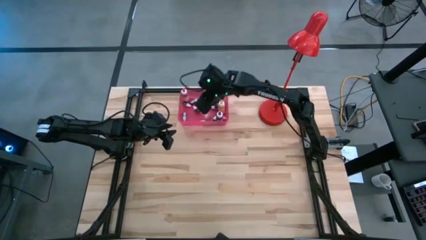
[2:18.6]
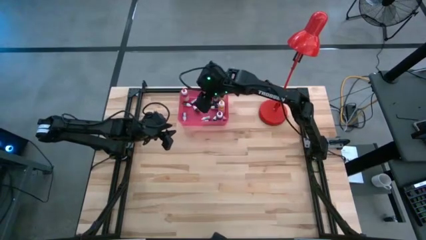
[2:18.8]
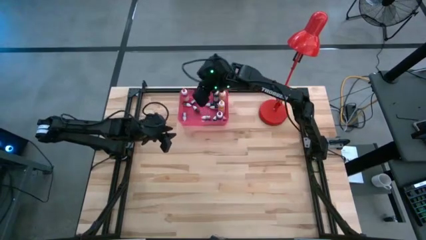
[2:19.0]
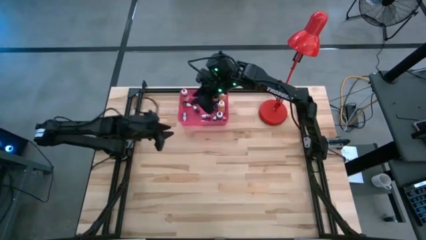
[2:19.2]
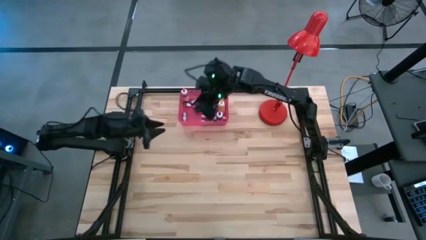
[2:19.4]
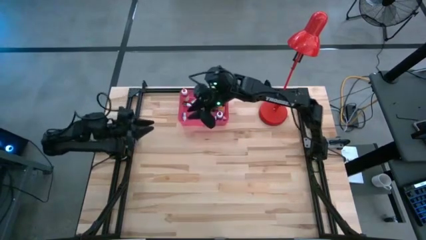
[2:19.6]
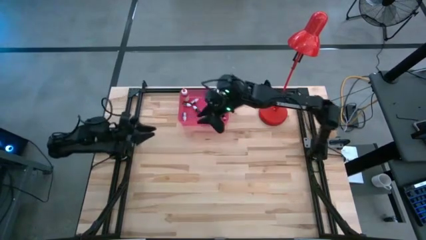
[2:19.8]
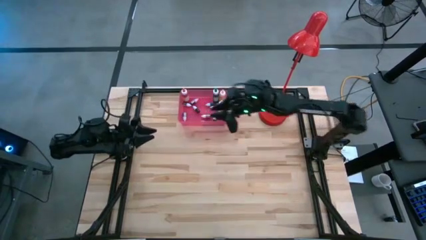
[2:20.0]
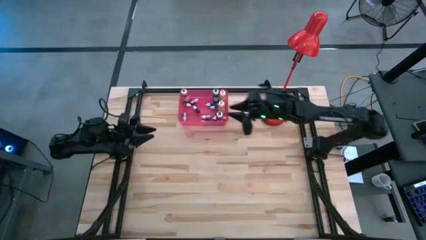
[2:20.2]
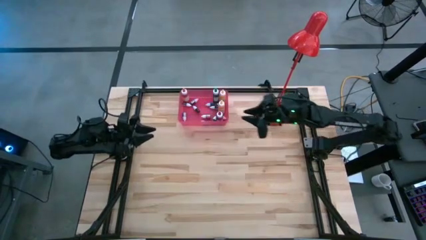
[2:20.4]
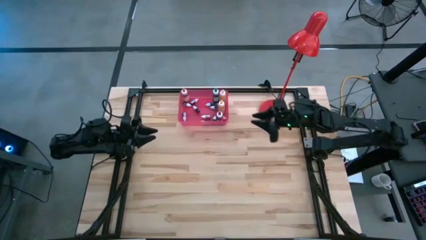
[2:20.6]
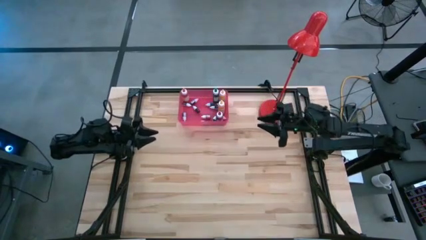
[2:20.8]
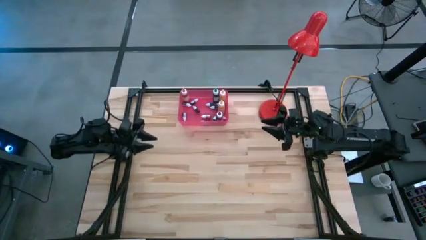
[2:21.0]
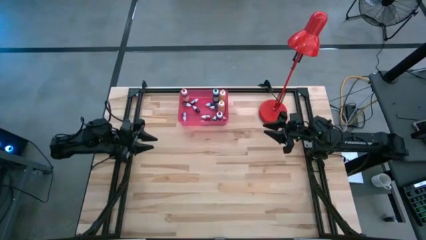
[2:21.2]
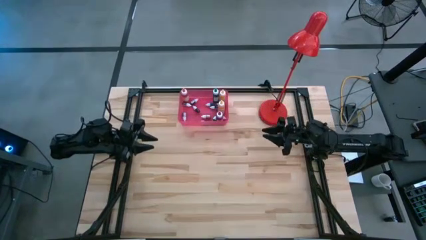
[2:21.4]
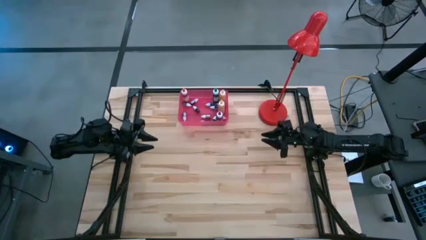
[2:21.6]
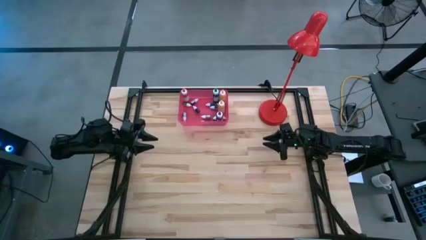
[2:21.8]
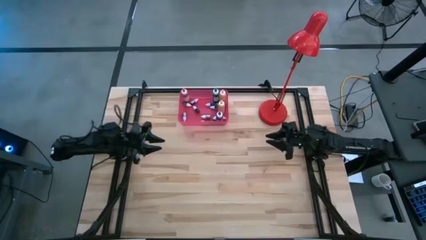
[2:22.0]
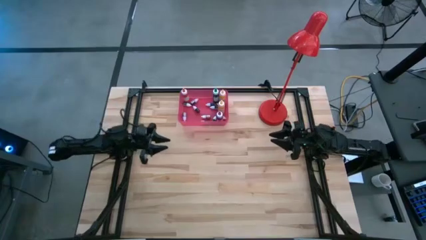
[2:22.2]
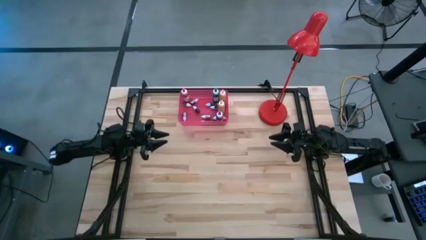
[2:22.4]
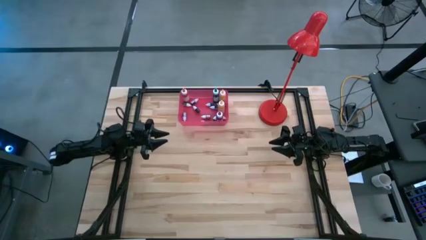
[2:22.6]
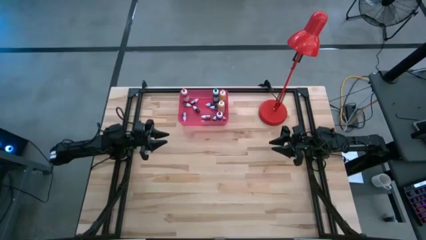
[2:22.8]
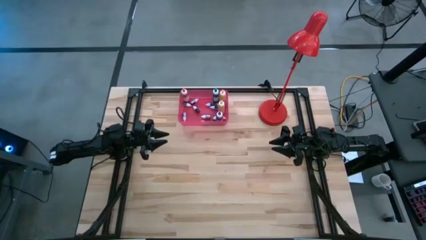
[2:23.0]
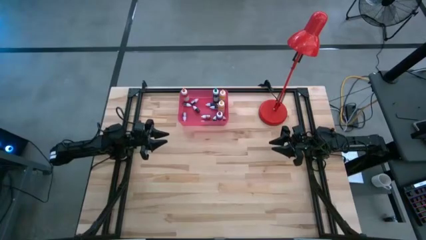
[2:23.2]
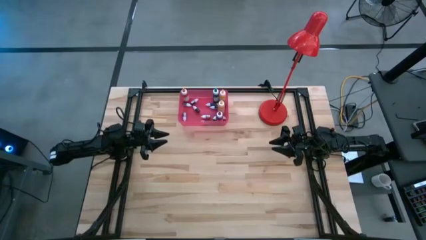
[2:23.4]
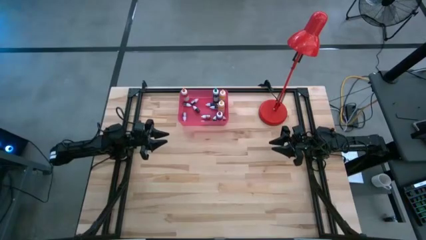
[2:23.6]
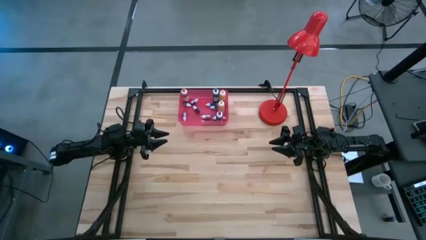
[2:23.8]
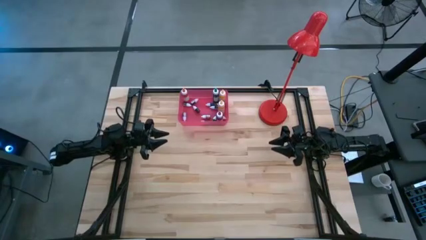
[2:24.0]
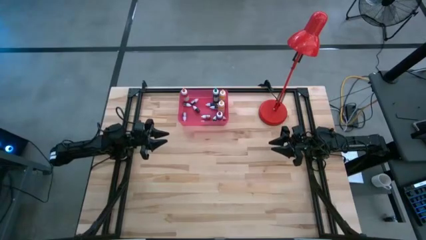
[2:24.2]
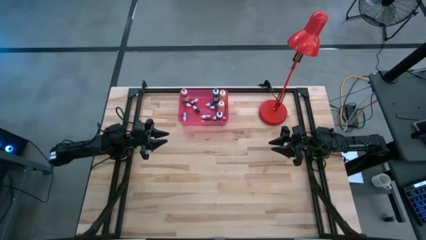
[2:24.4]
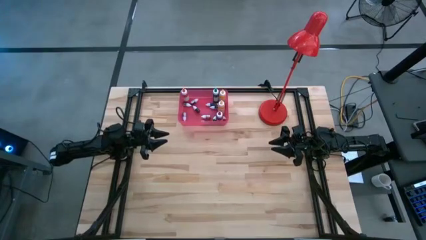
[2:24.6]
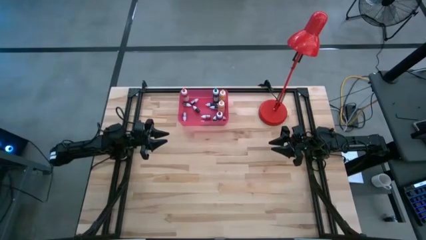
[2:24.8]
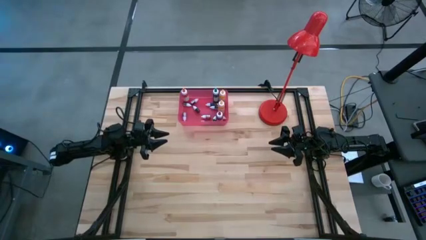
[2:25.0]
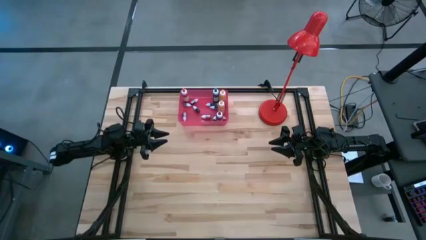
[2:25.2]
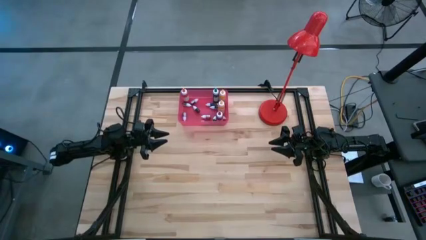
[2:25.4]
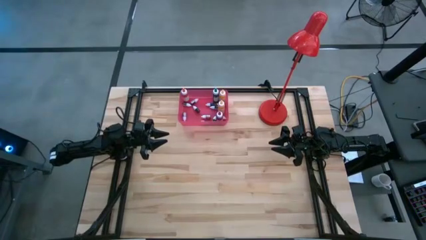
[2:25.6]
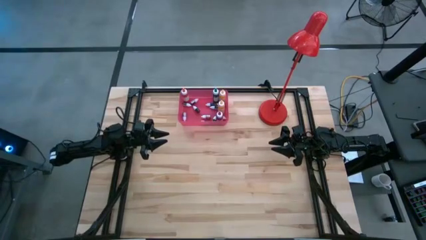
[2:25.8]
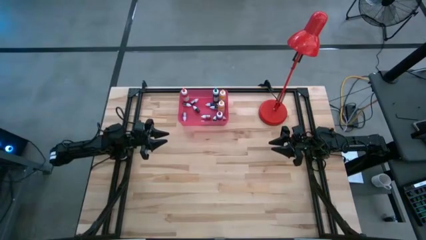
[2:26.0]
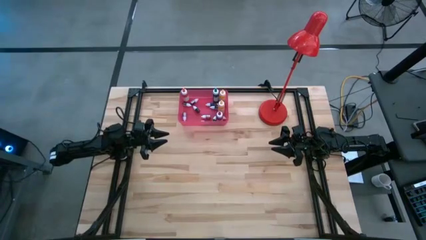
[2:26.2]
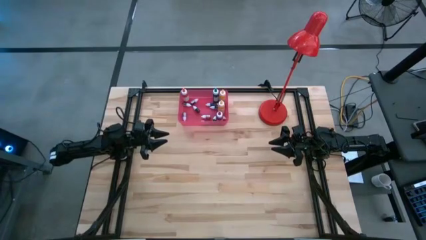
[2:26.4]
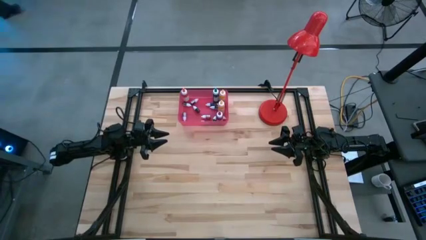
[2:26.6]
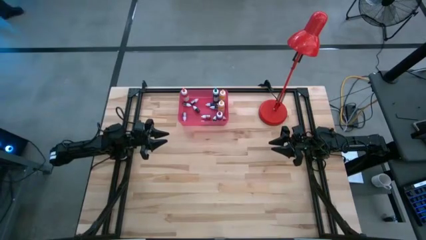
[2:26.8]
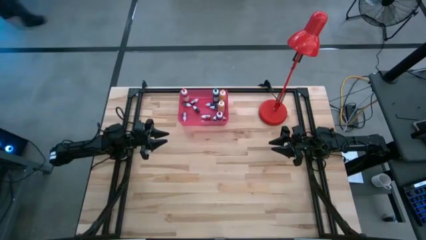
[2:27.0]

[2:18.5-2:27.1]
Task: Pick & Place food coloring
Return to Home Position

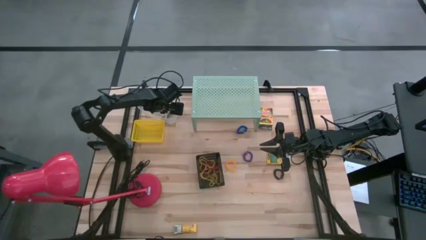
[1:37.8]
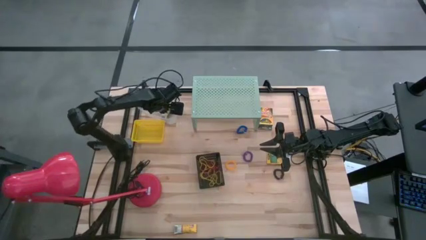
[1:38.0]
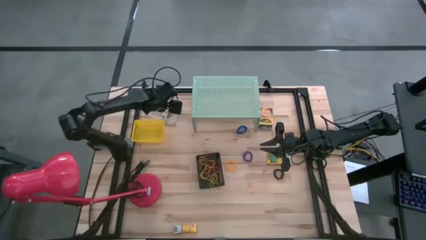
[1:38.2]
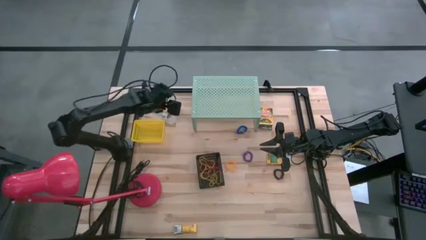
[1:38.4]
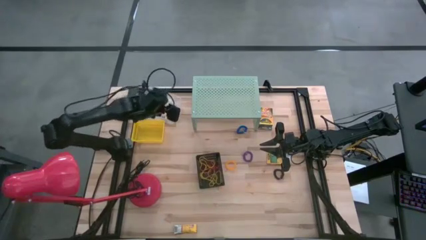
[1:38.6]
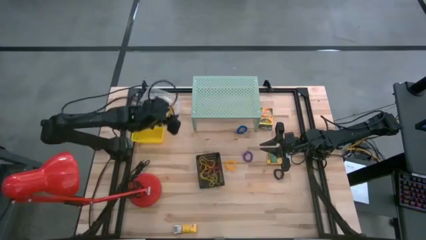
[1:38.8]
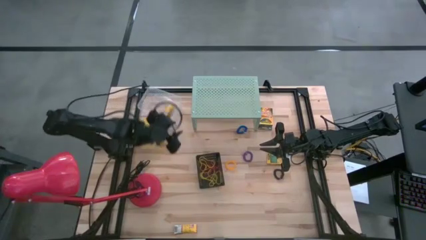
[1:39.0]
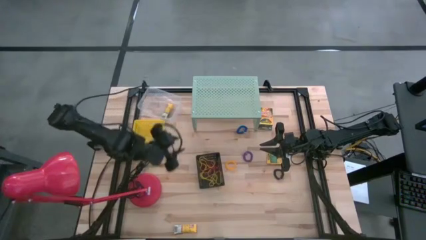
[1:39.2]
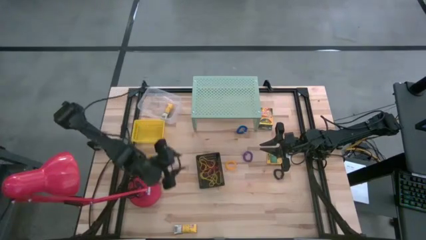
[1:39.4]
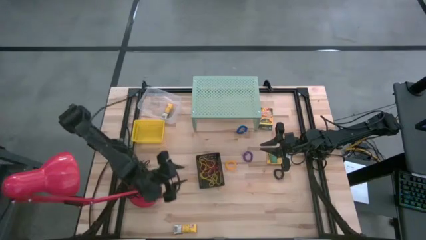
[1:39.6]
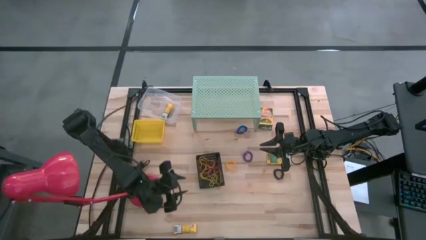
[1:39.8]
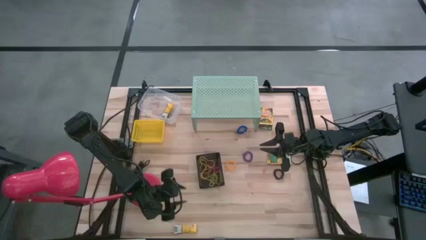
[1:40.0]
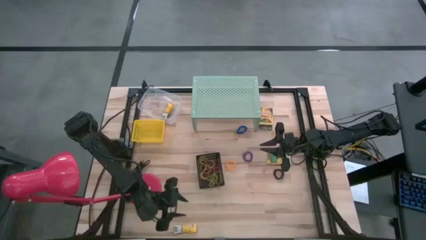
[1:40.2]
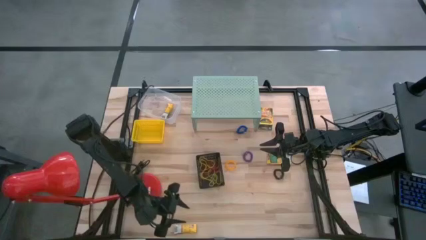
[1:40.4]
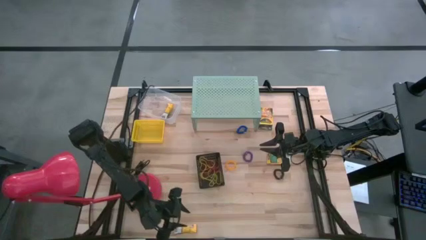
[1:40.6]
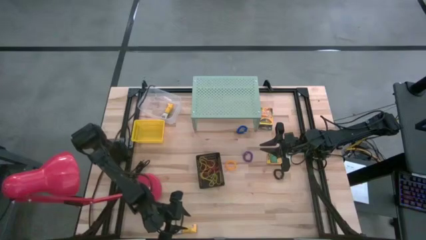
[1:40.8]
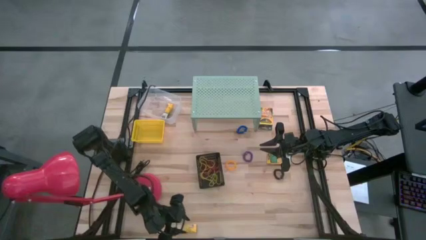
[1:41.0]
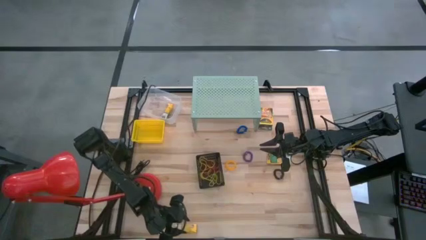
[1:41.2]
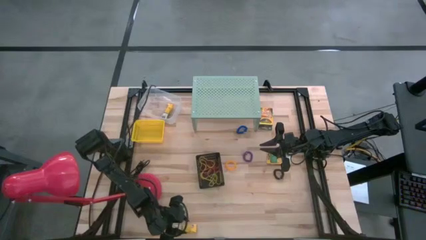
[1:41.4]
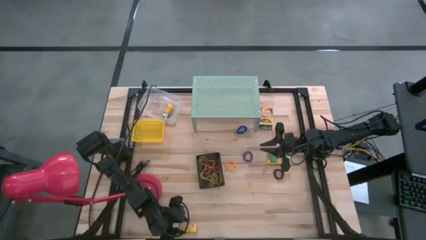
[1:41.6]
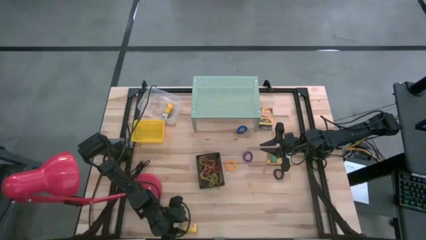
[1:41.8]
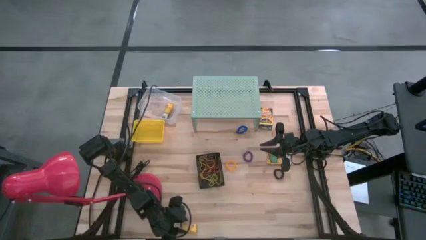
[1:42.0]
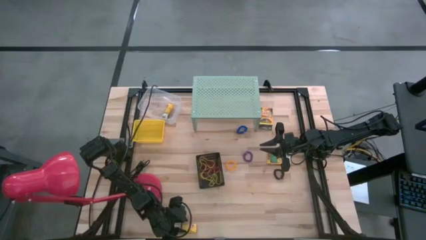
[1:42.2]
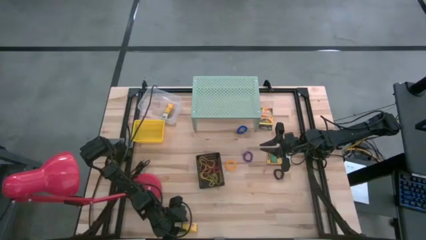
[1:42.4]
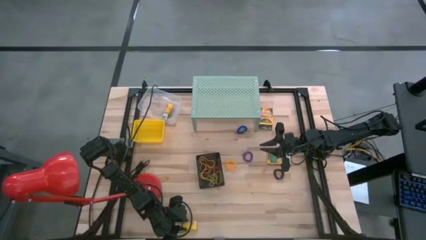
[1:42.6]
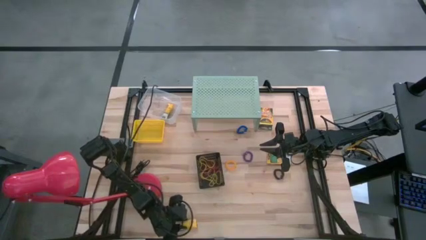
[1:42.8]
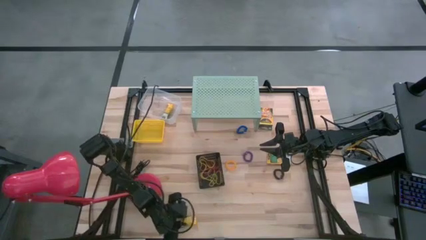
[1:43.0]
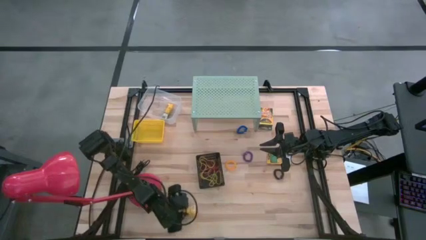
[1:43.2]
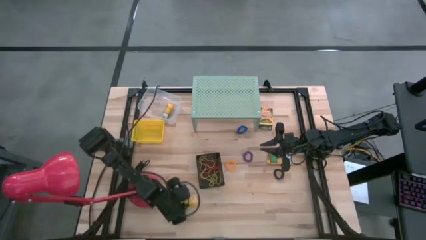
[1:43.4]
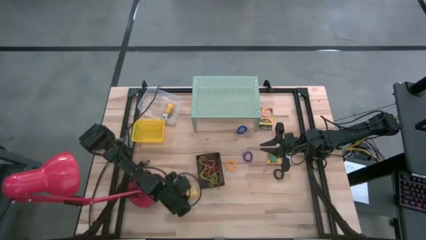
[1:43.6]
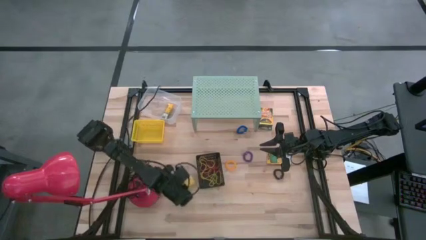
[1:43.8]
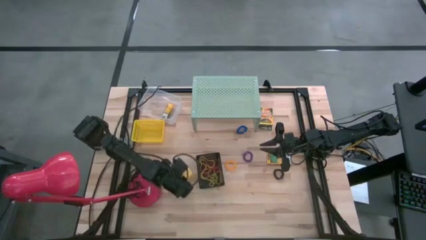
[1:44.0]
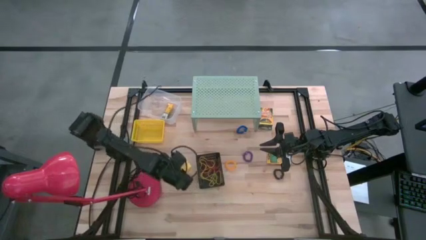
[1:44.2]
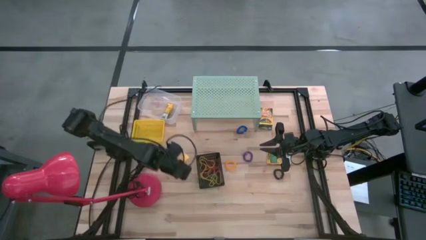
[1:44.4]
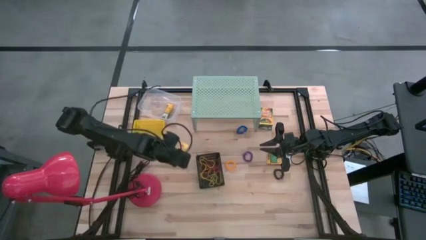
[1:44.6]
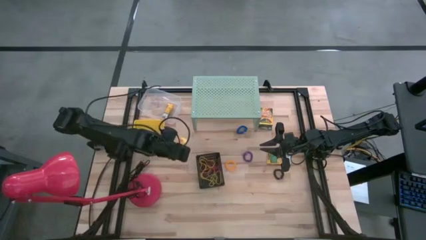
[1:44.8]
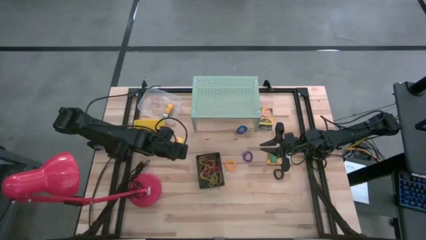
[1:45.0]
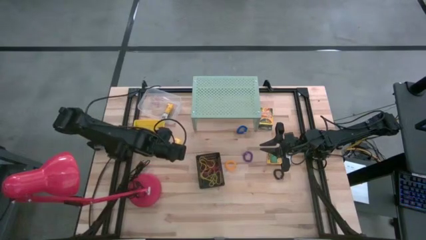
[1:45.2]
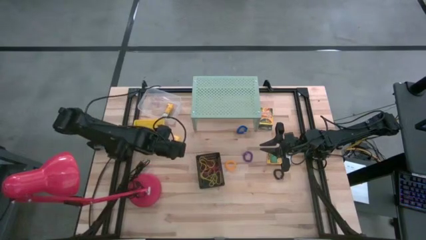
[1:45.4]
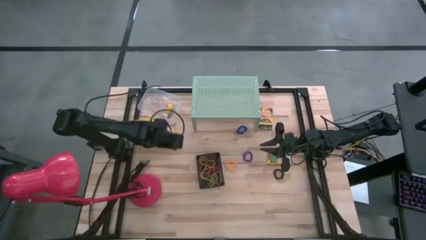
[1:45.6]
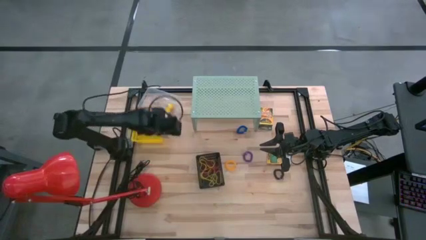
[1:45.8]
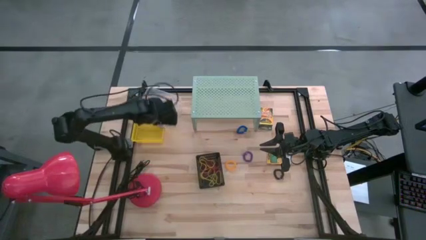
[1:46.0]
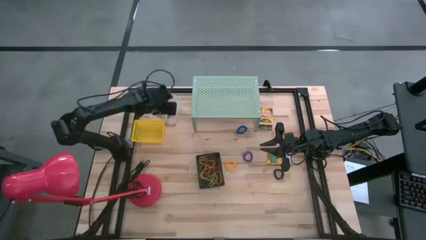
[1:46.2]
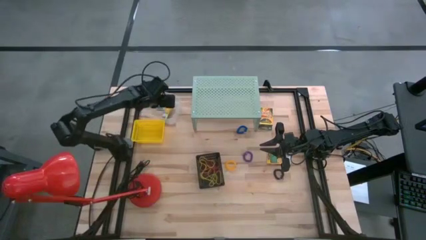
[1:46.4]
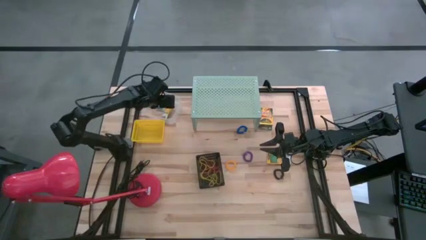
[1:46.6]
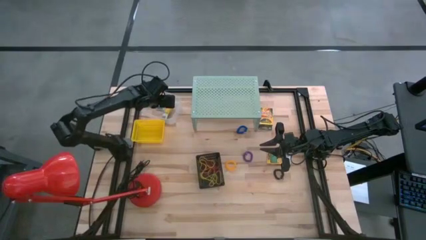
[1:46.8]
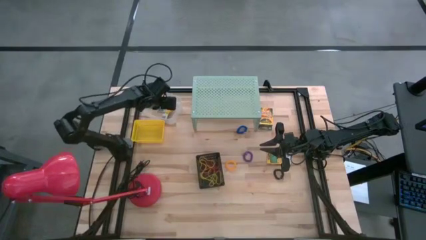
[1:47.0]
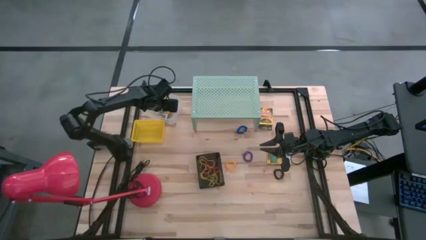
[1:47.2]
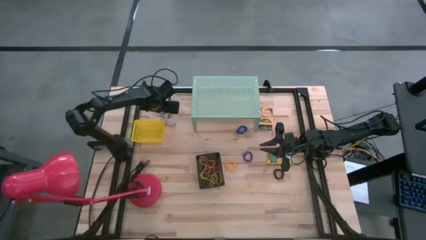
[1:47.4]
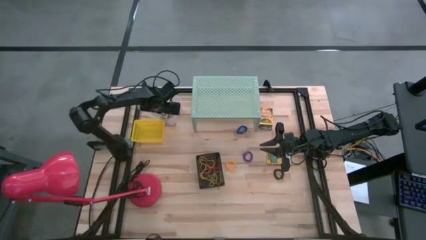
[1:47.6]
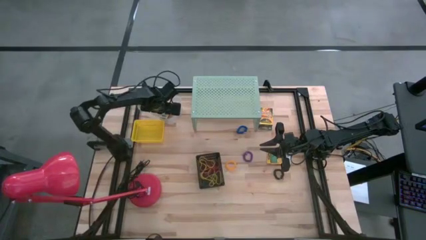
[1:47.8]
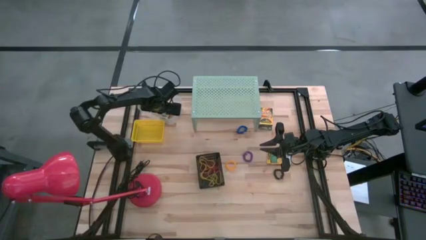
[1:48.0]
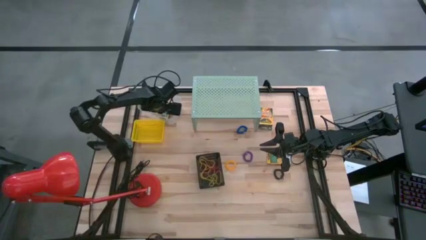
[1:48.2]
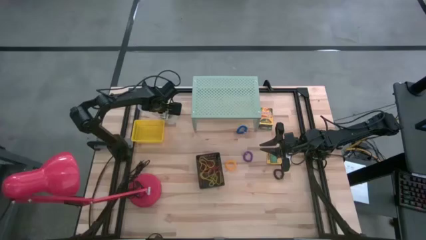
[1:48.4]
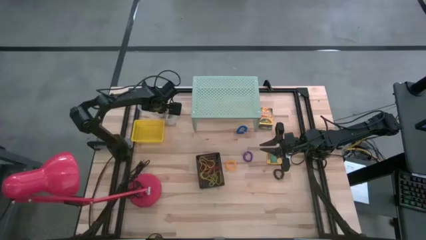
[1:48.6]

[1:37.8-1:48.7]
Task: Pick & Place Office Desk Supplies
Put the small crayon box into the transparent bin
